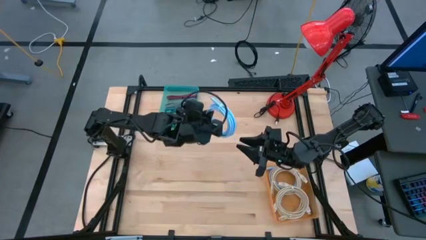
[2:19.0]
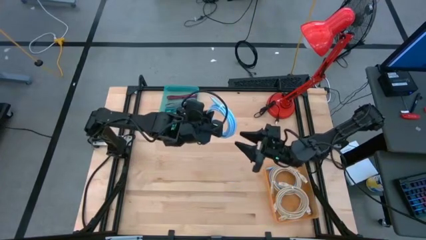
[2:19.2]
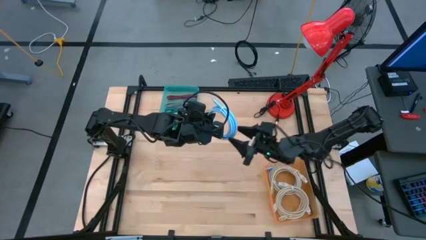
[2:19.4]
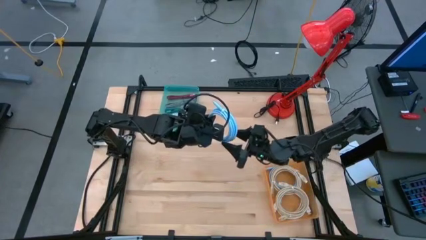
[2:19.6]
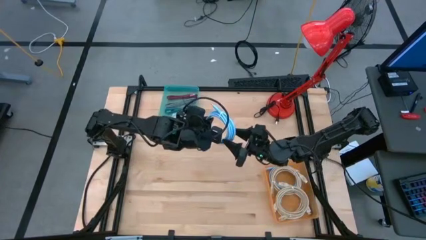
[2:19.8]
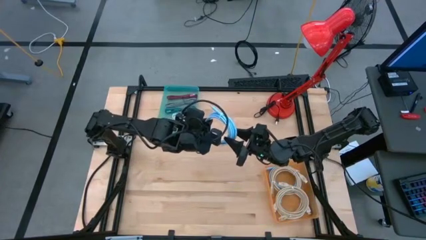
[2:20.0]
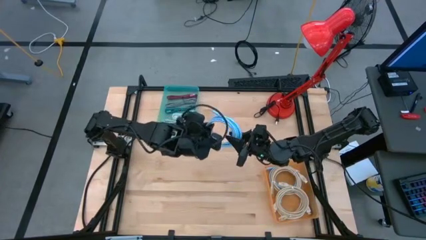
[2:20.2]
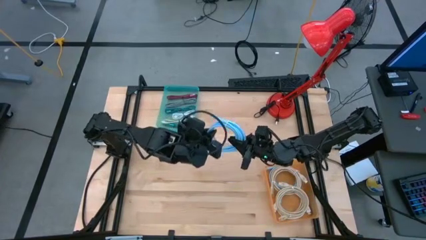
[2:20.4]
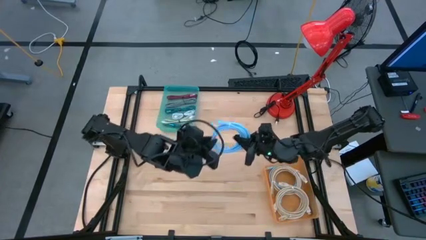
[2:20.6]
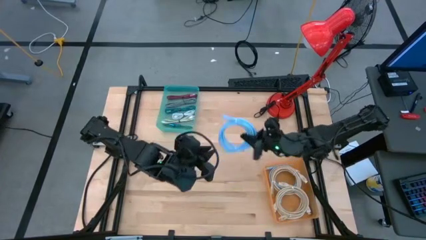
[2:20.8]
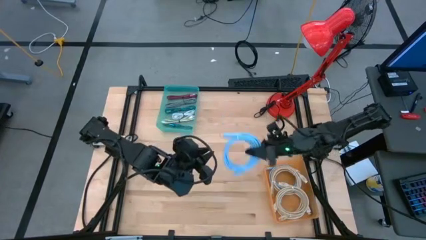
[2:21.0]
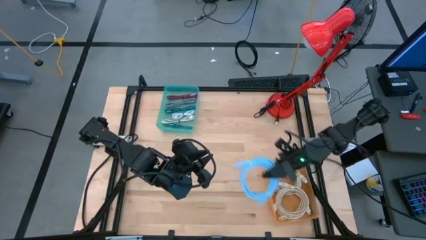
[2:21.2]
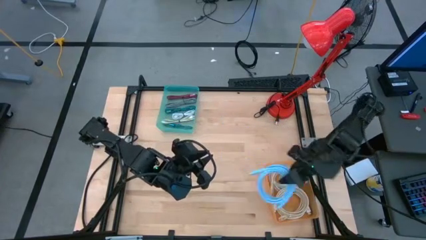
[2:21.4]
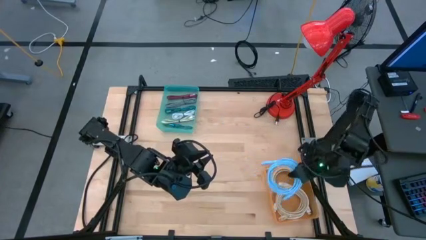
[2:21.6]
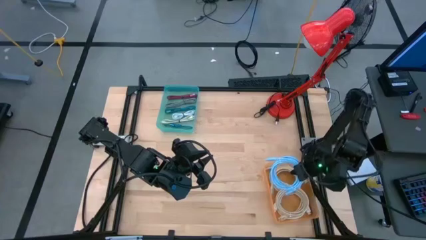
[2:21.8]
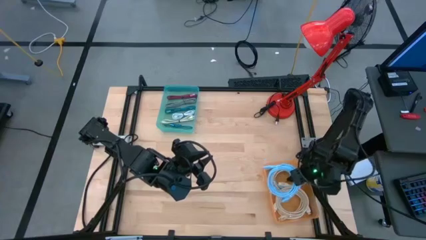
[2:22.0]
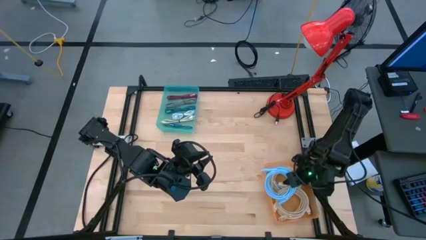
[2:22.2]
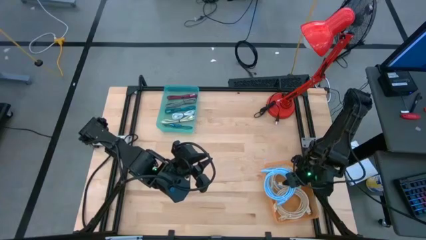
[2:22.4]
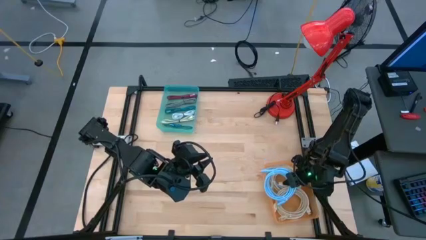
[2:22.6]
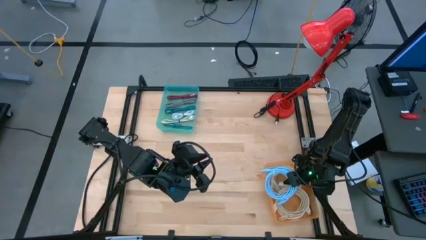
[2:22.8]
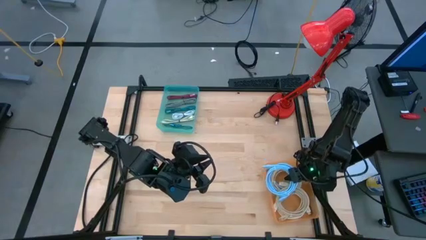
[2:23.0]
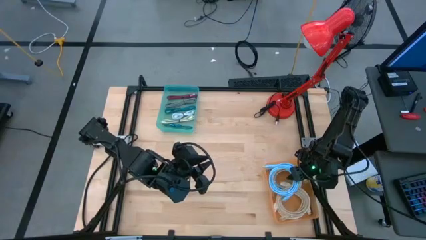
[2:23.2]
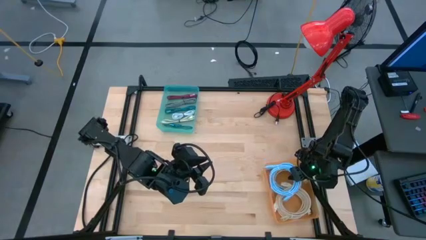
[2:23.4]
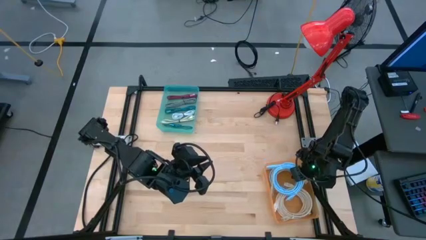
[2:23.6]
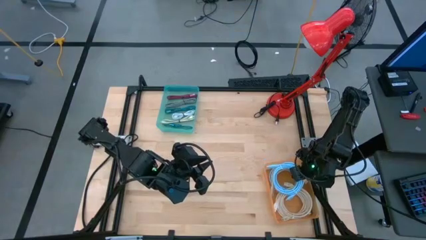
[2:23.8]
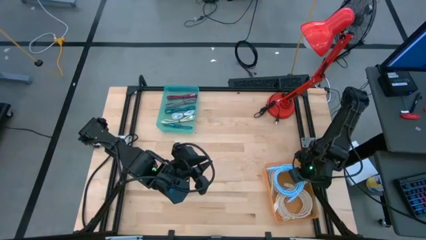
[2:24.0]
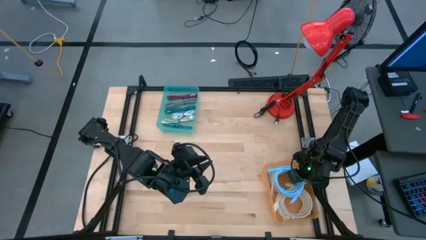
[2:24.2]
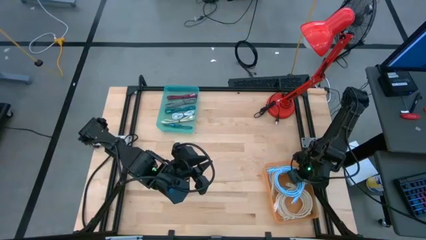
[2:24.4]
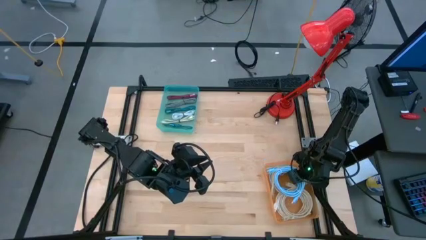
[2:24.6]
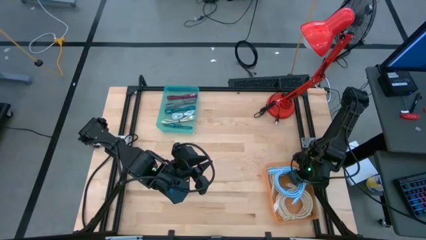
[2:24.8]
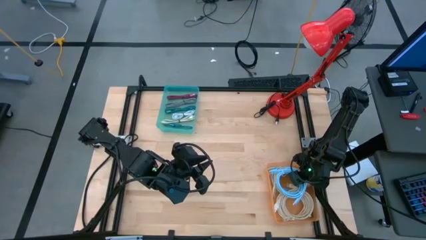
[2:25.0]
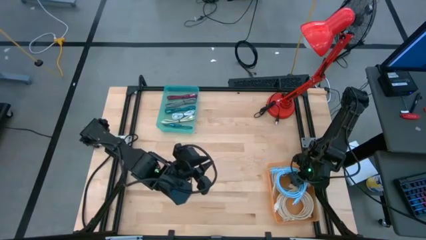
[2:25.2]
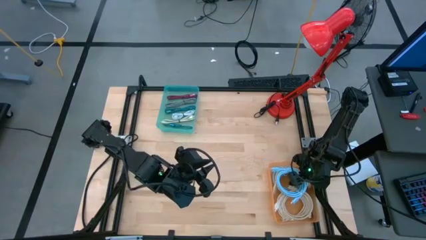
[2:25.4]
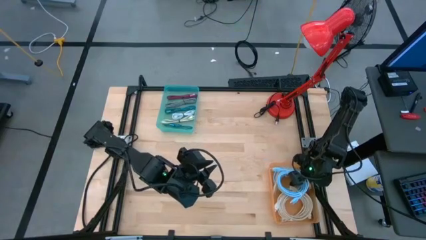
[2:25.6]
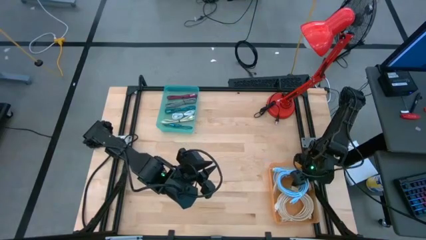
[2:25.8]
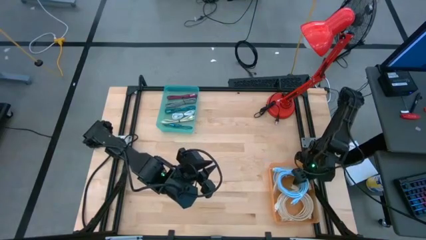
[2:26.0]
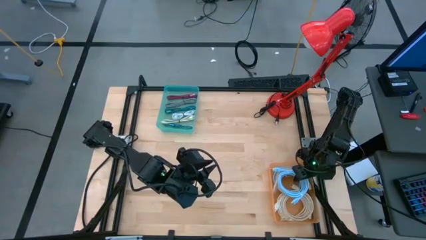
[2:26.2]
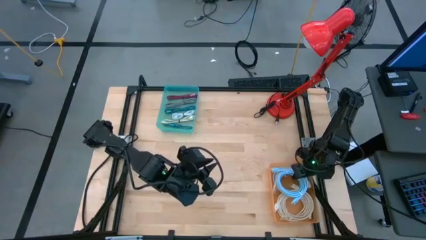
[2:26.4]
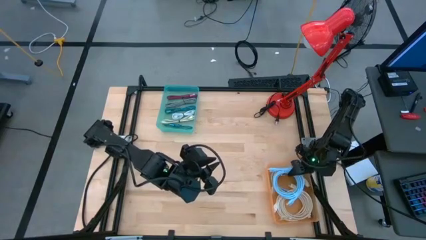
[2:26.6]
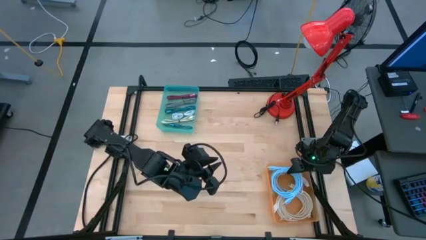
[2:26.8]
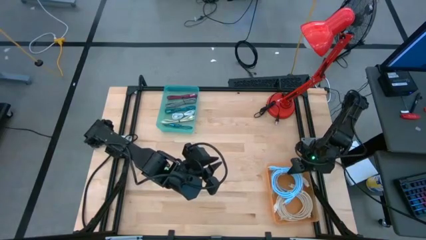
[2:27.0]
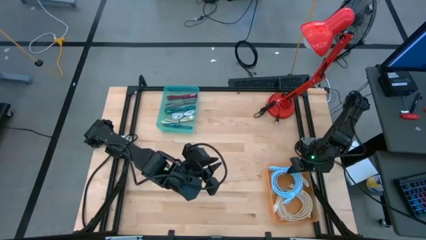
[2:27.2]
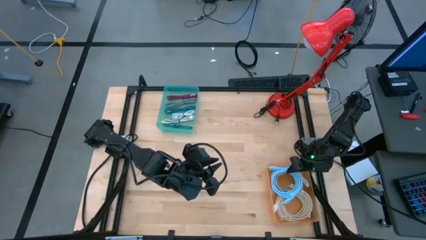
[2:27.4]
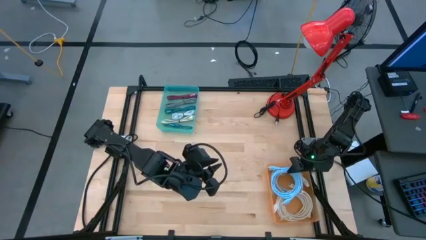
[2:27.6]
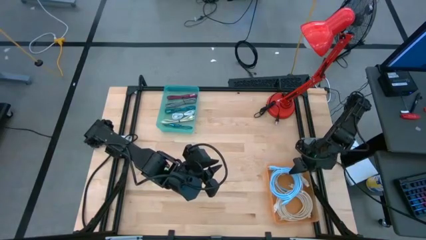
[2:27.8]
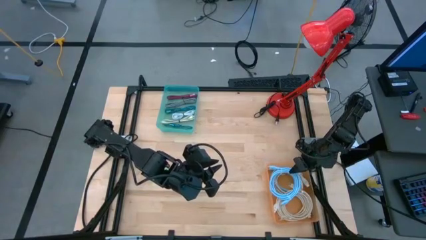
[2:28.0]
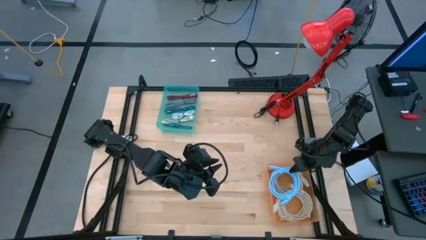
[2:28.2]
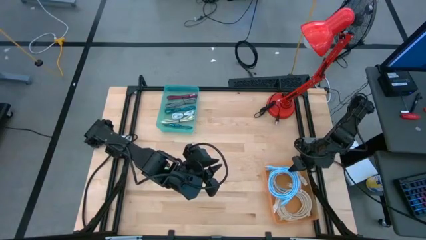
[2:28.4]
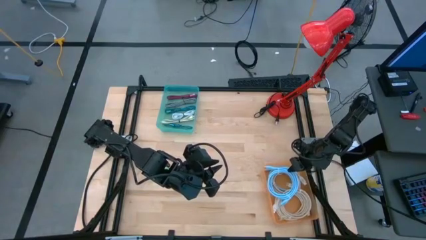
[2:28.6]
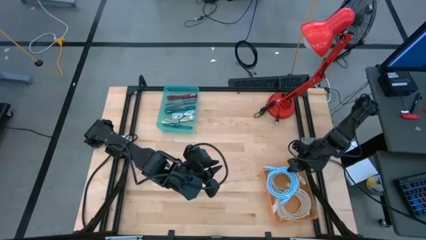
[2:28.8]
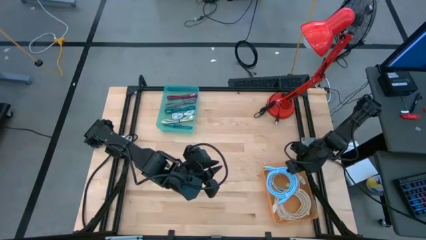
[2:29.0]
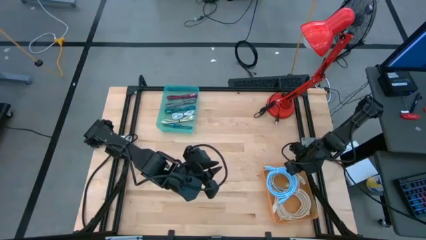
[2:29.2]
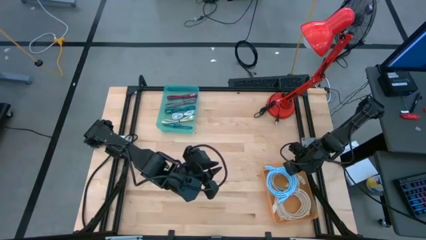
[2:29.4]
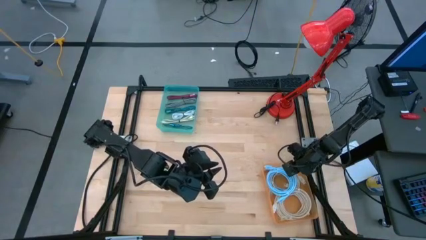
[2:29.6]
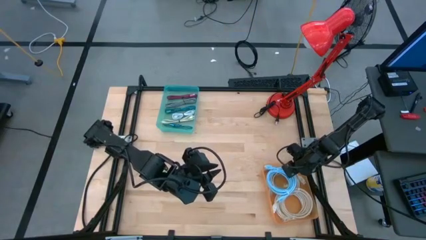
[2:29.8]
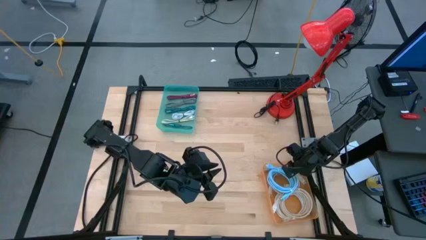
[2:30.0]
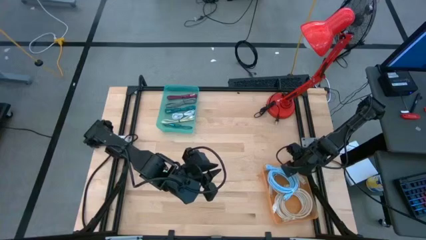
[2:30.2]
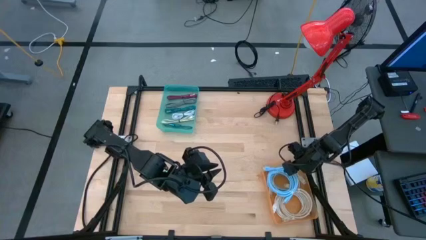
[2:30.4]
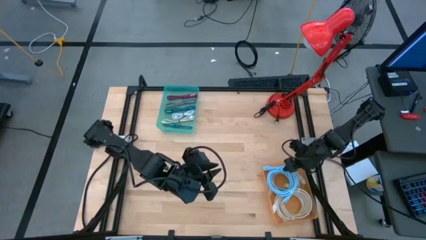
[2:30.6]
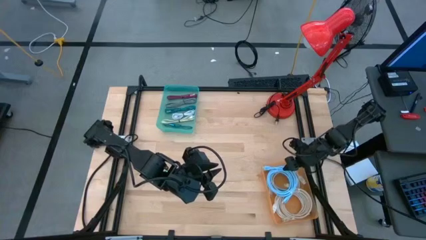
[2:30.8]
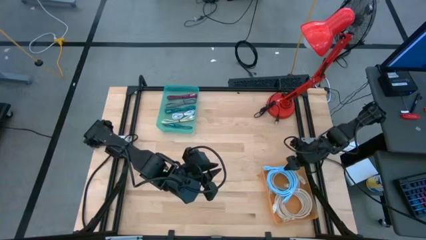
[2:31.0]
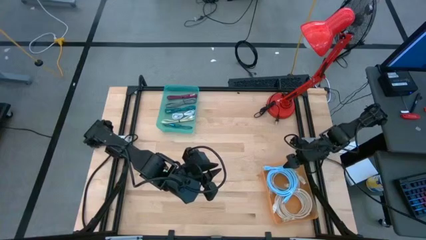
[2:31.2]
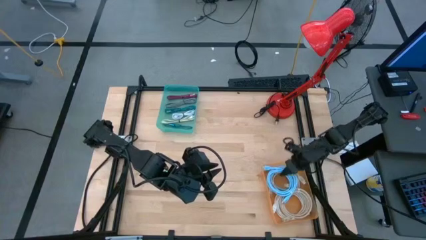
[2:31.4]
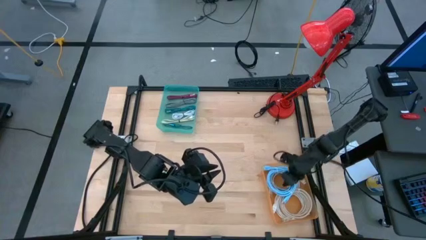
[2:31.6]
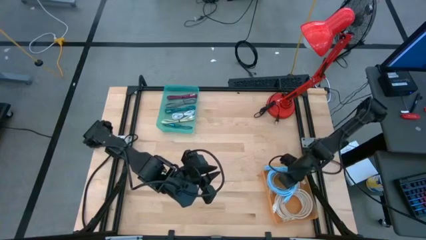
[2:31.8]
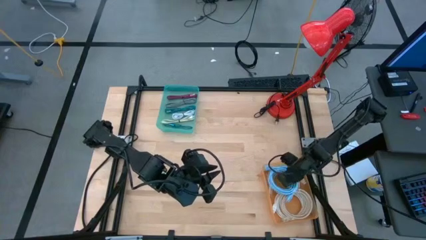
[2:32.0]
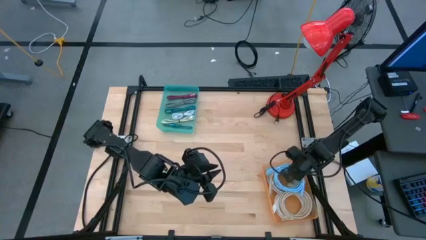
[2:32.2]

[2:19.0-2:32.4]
Task: Pick & Place USB Port
Put the blue HDMI cable into the orange bin

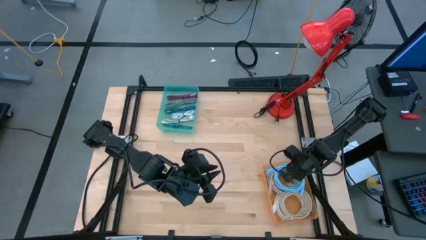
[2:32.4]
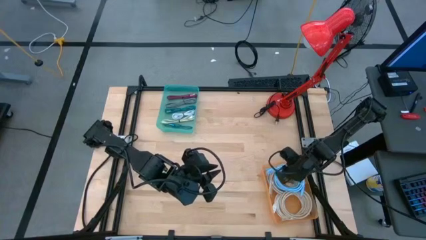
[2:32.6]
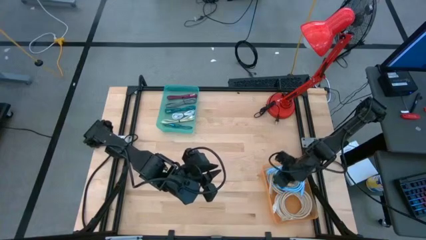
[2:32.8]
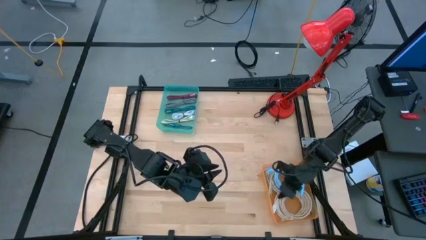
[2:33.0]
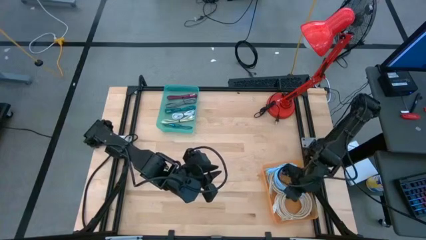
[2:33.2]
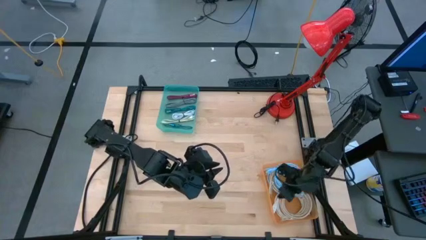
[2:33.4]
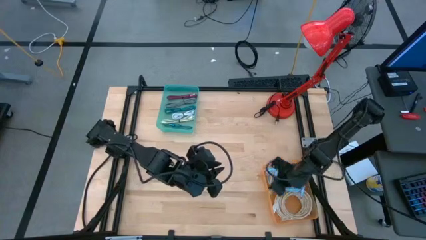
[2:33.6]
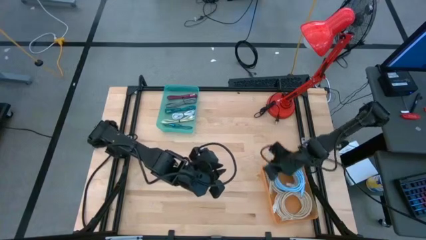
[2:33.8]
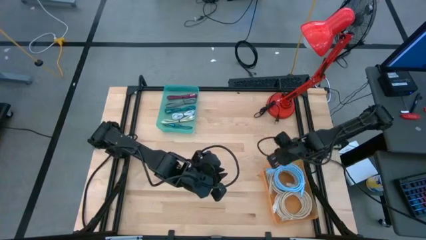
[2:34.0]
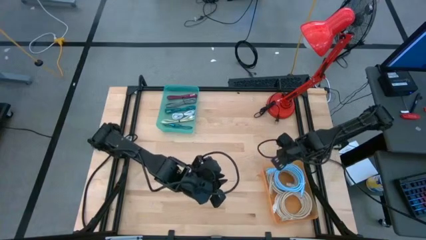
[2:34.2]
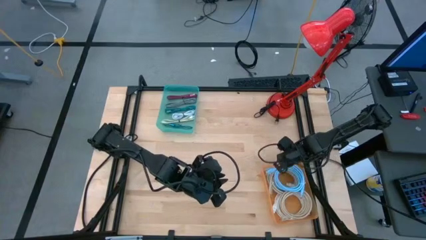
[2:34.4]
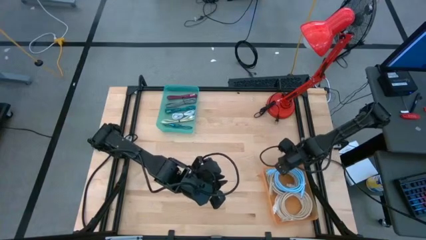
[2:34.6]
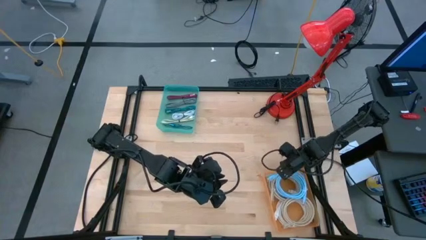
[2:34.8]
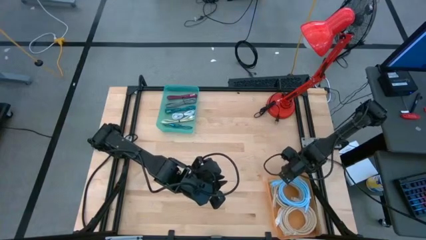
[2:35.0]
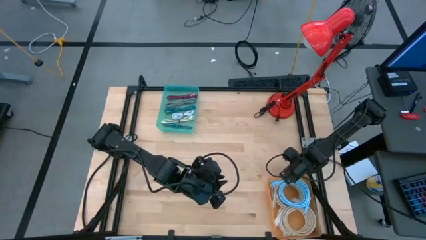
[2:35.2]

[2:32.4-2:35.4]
Adjust the orange bin

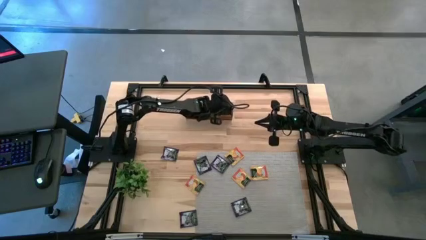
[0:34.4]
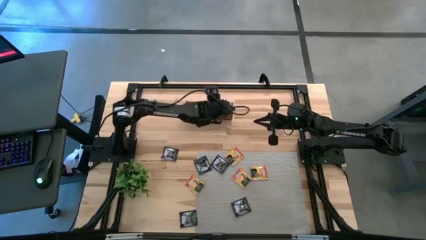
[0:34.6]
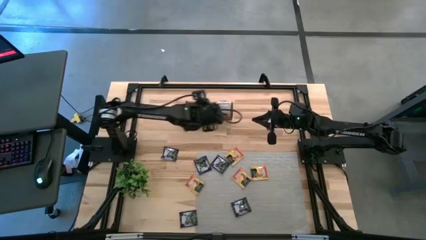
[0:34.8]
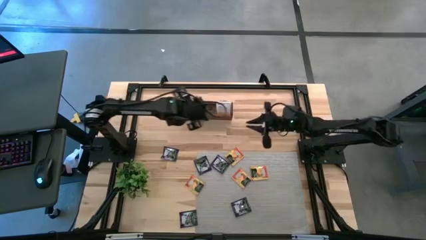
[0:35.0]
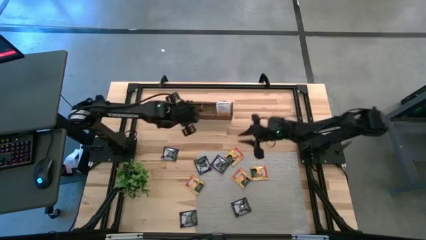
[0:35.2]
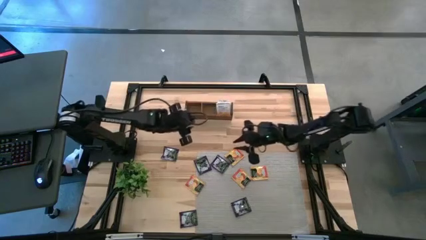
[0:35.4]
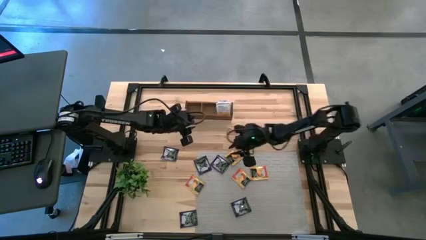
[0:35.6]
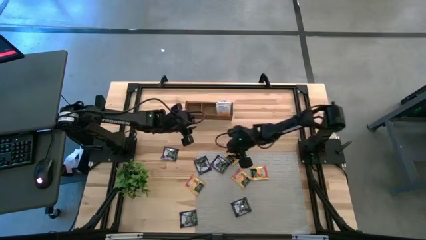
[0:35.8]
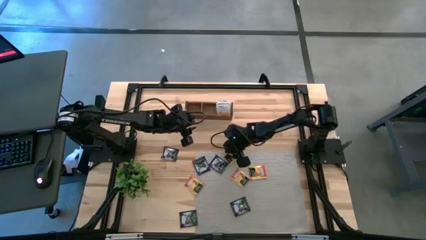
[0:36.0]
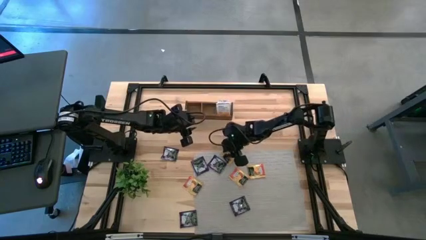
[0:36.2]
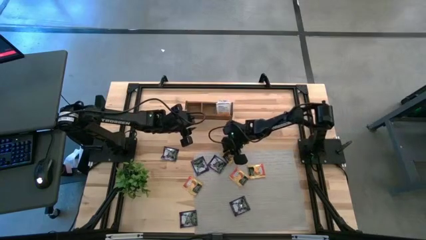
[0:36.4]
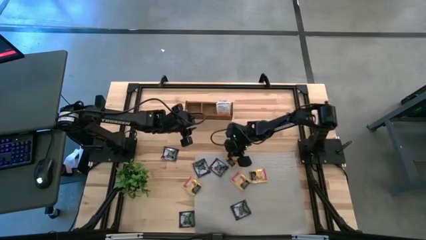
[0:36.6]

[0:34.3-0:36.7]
Task: Pick & Place Tea
Put the orange tea bag into the left section of the wooden organizer
